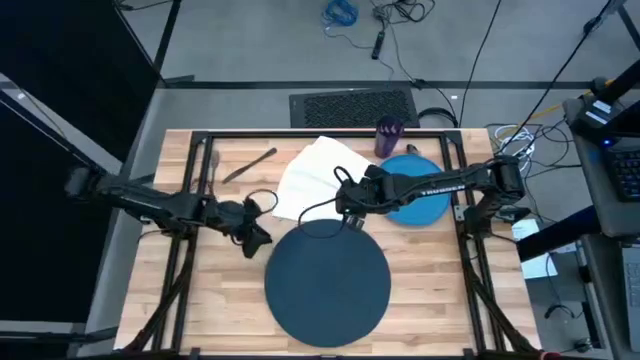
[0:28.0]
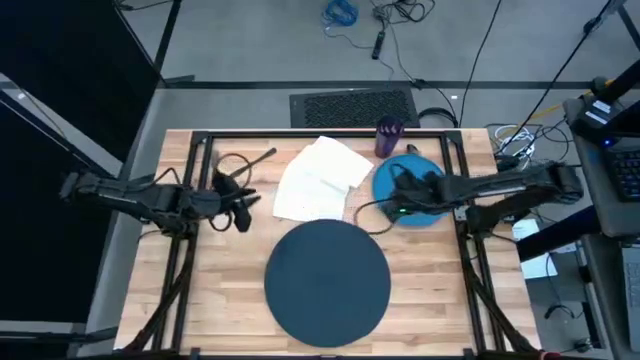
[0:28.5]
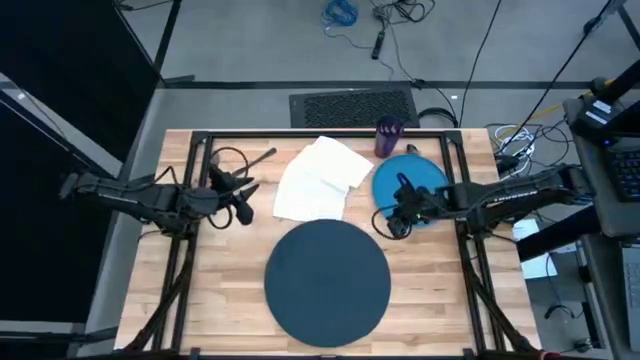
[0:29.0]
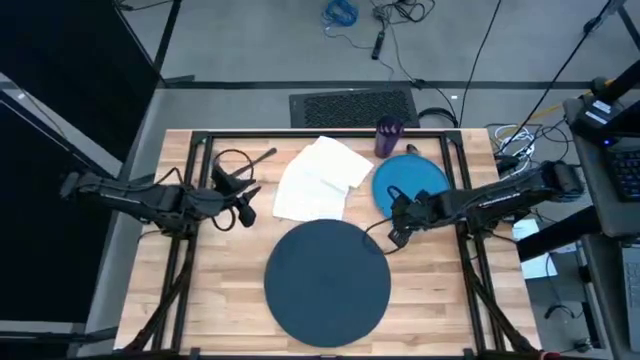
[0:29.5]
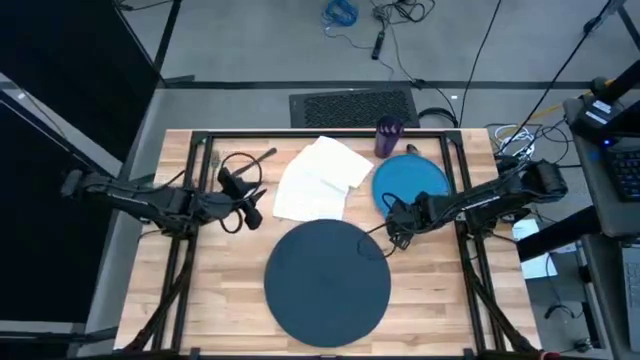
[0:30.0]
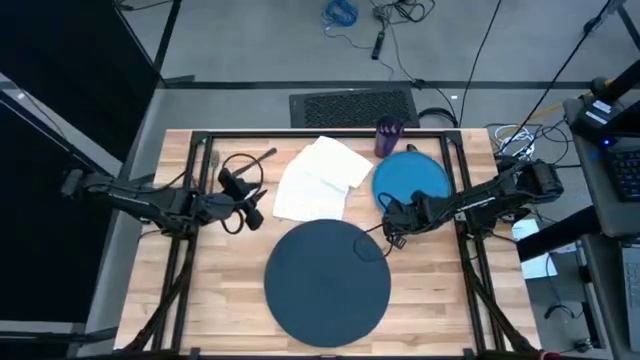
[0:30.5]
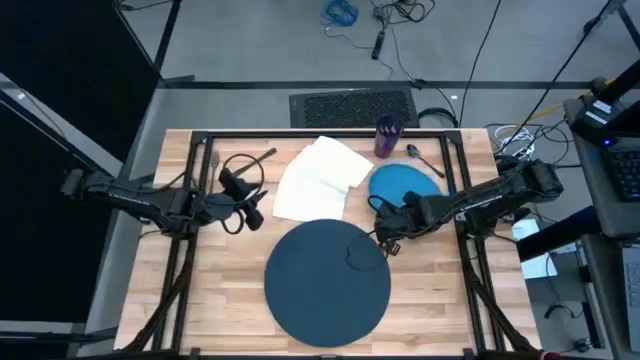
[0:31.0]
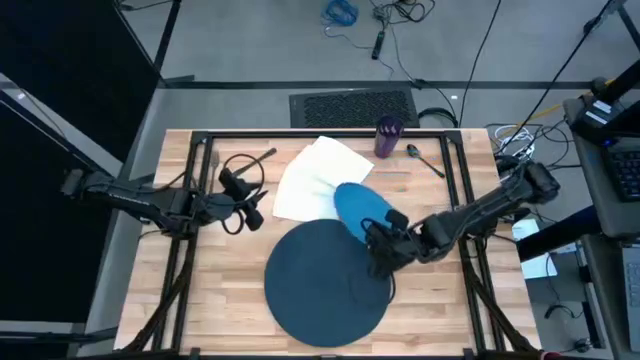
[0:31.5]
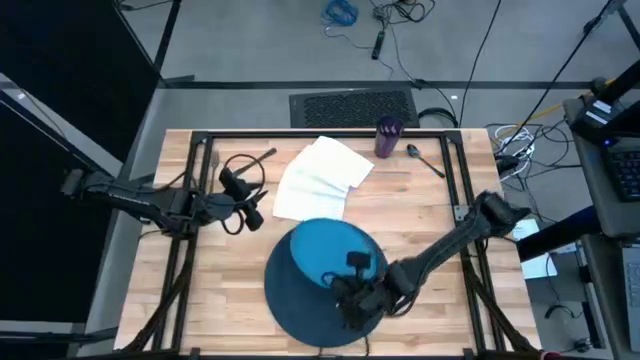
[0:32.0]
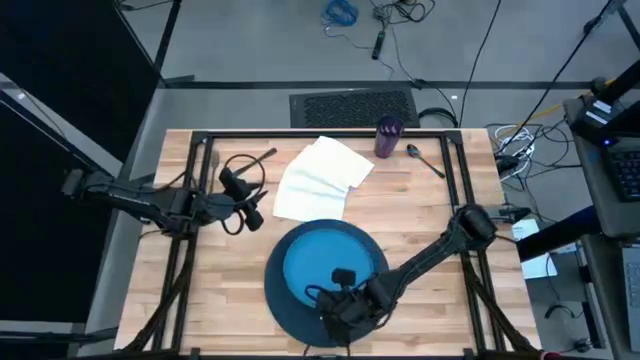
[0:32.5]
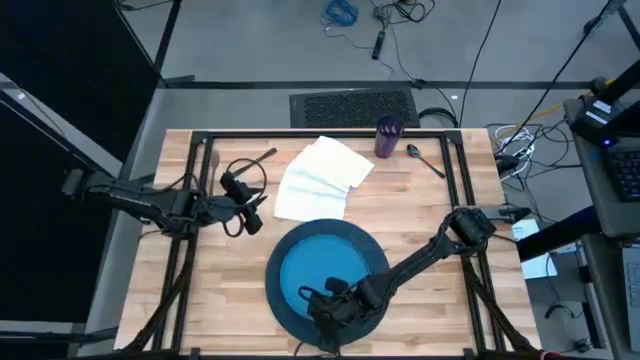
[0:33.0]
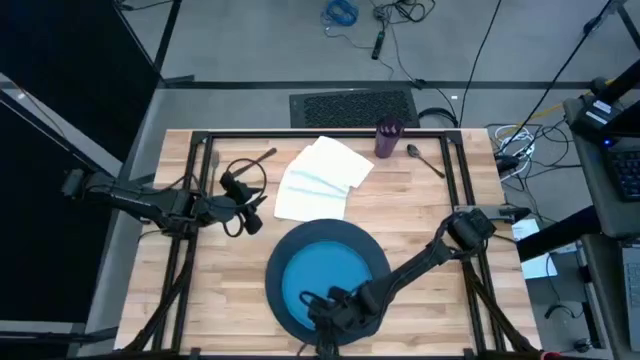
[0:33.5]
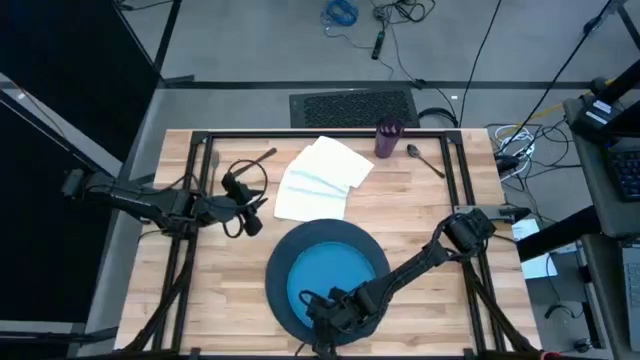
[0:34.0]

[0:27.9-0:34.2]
Task: Set table place
Put the blue plate to bottom on the blue table mat

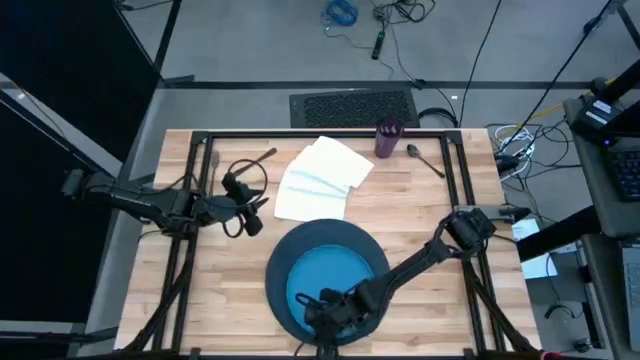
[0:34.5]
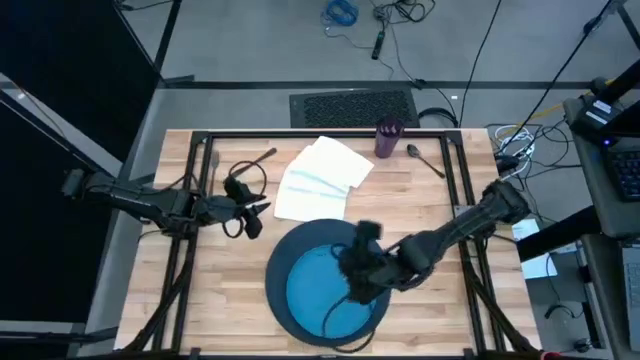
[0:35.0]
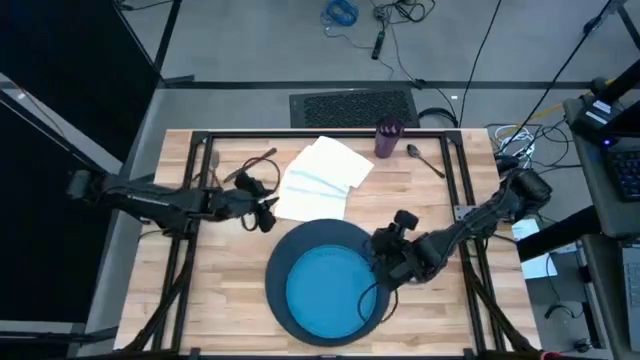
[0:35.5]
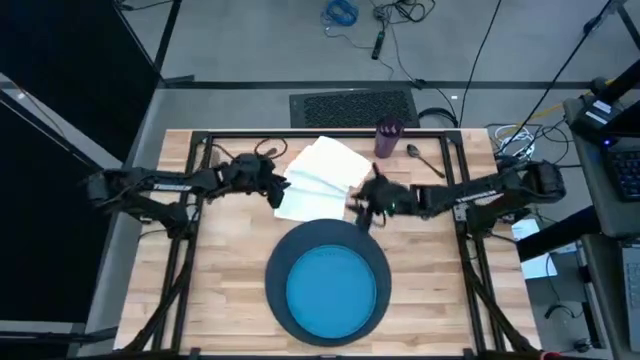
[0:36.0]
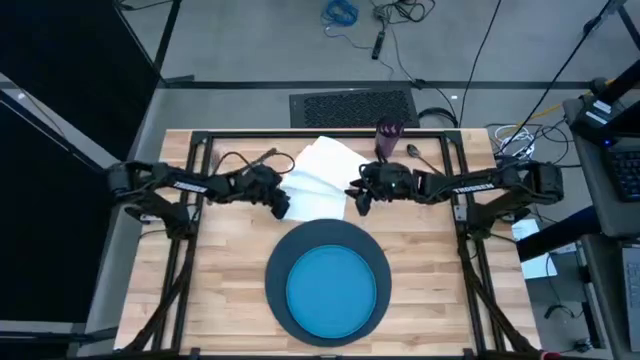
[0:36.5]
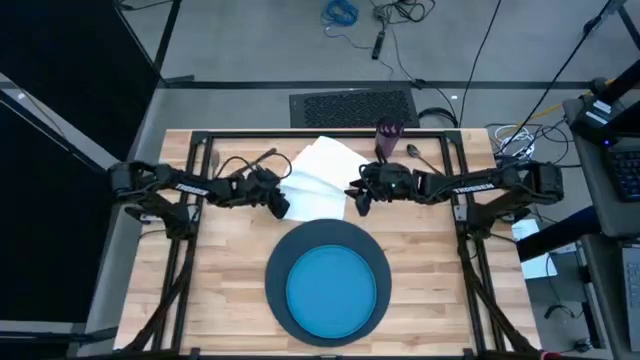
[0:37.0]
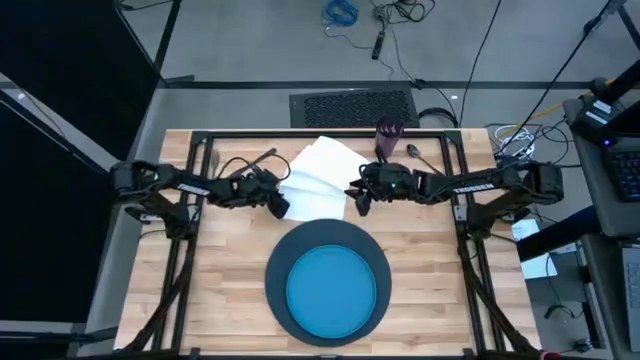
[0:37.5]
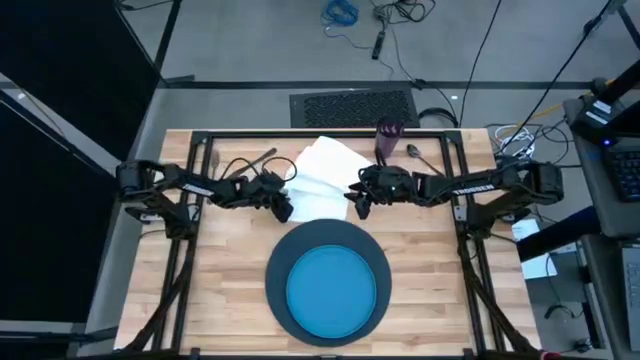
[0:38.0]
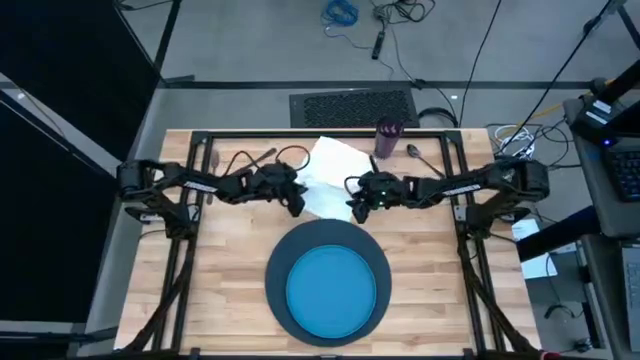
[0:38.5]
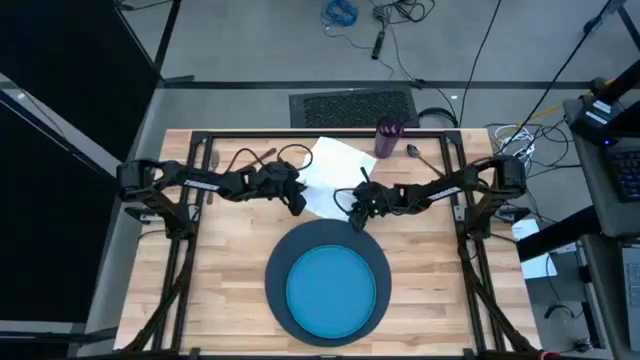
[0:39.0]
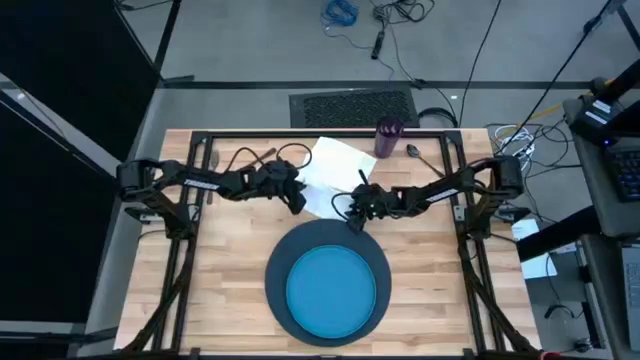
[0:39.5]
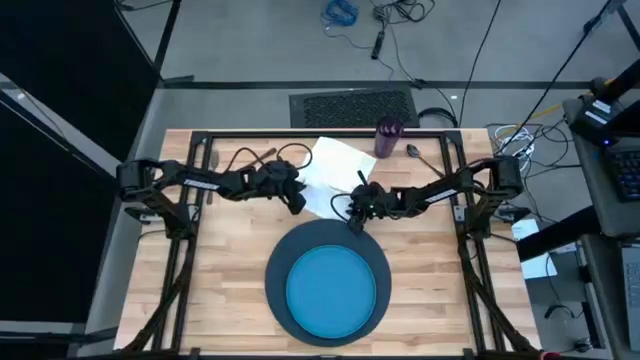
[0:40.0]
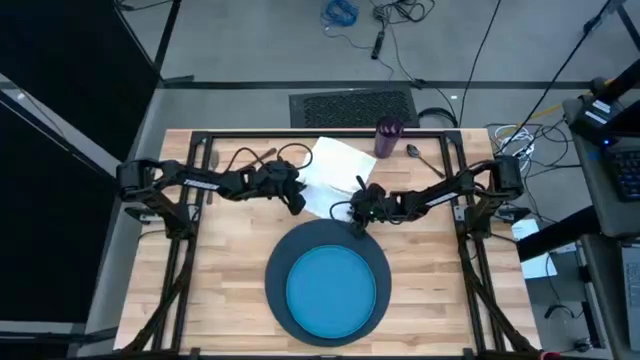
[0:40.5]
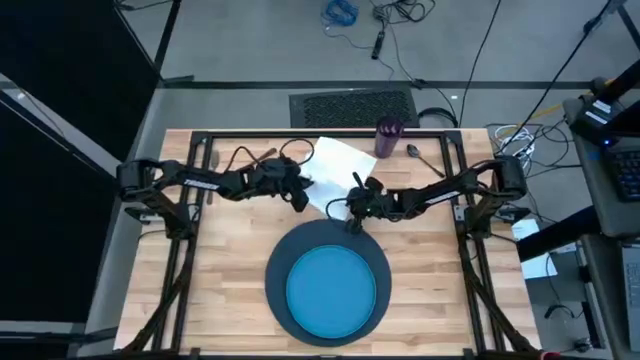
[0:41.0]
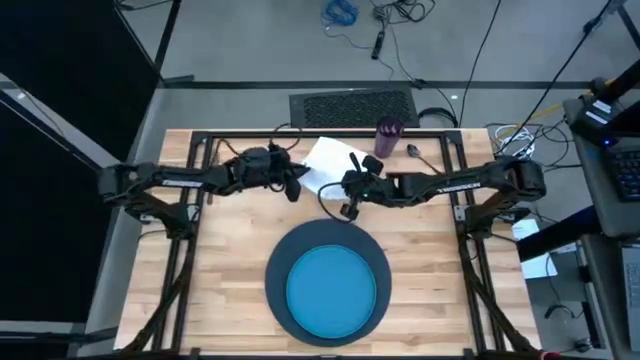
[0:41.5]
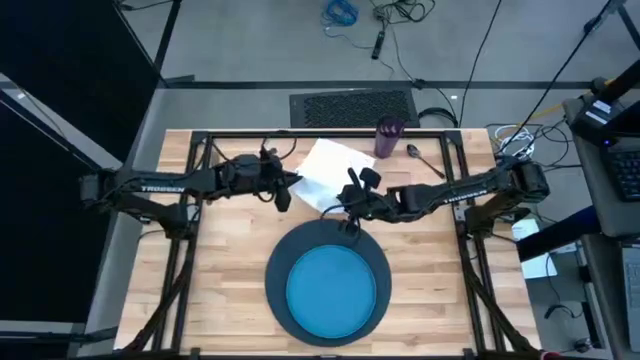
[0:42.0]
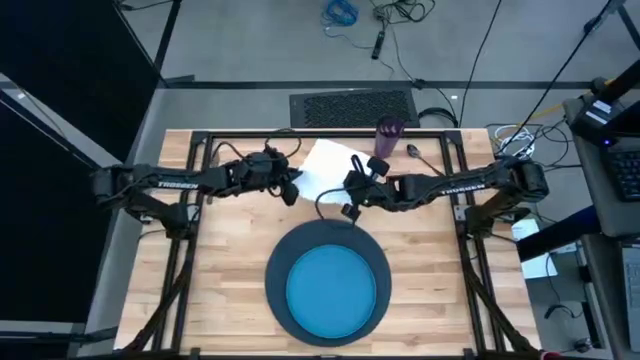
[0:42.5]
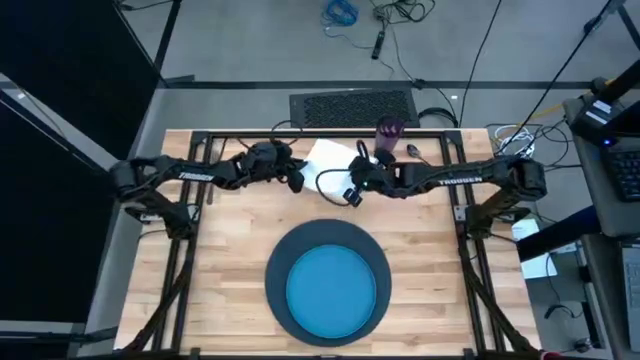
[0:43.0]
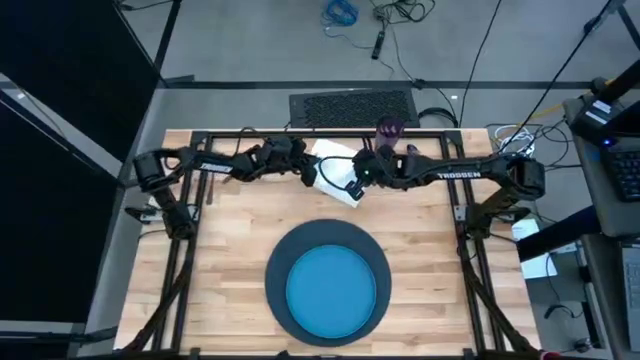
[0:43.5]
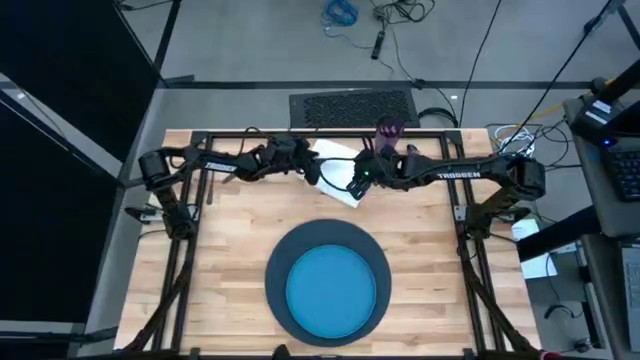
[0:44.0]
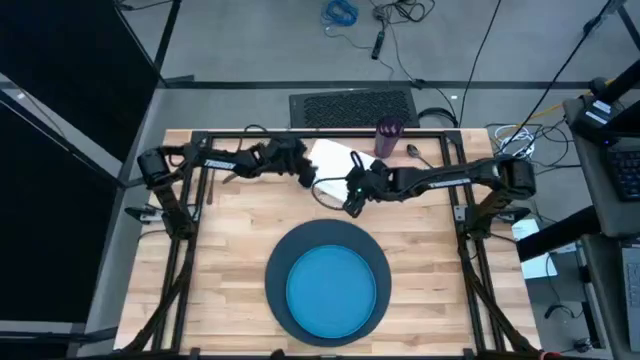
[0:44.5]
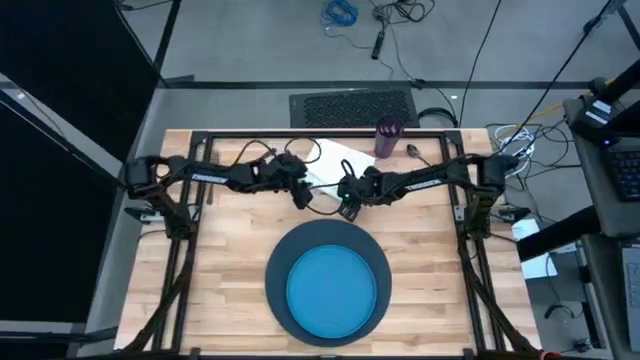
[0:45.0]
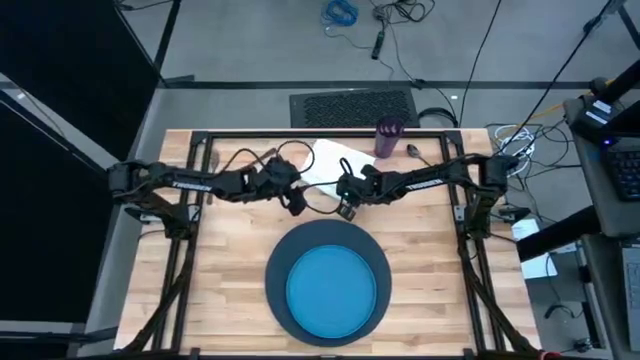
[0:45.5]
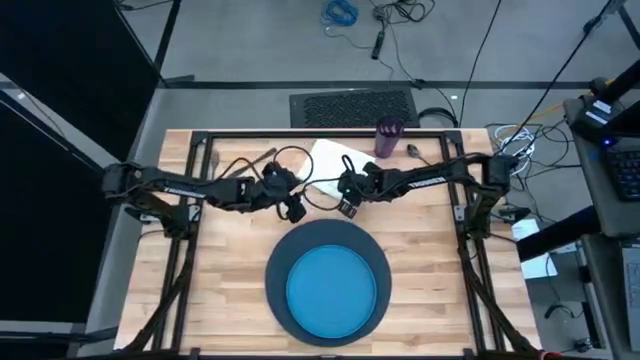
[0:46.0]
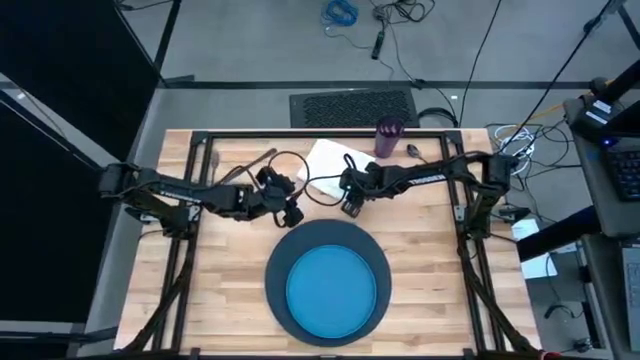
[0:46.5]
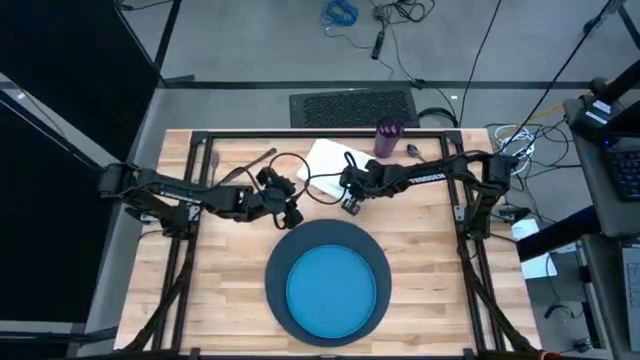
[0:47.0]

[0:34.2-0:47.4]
Fold the white table napkin
